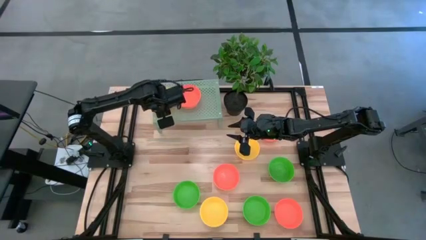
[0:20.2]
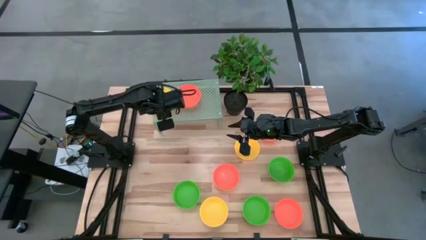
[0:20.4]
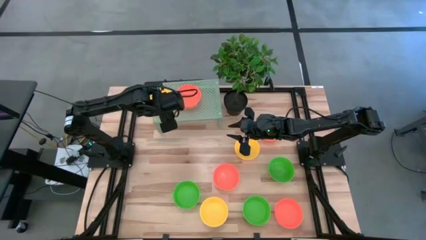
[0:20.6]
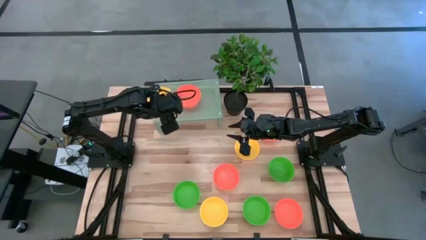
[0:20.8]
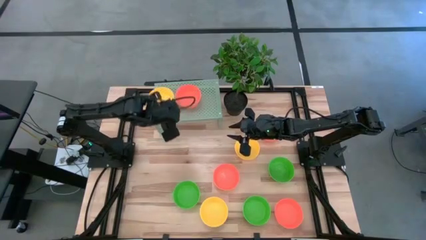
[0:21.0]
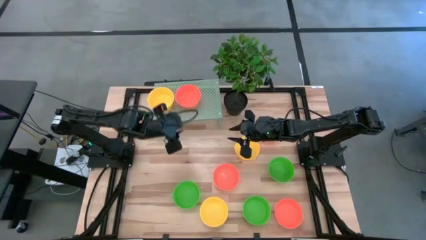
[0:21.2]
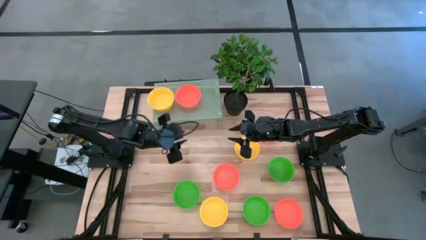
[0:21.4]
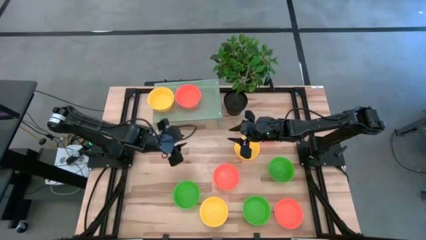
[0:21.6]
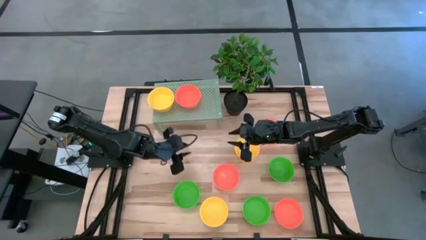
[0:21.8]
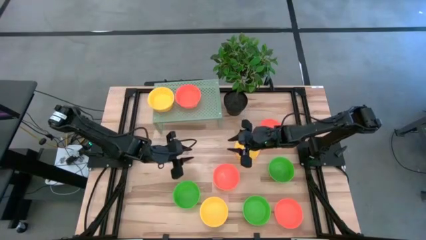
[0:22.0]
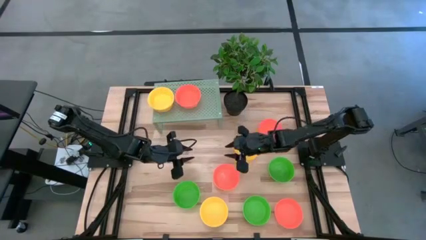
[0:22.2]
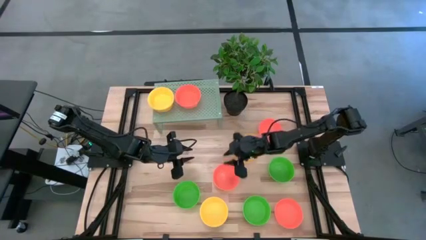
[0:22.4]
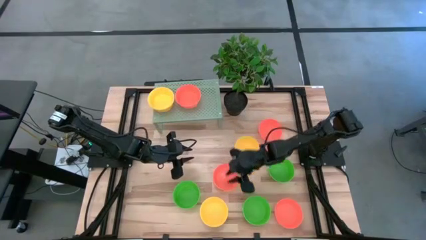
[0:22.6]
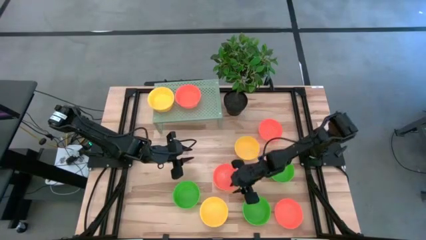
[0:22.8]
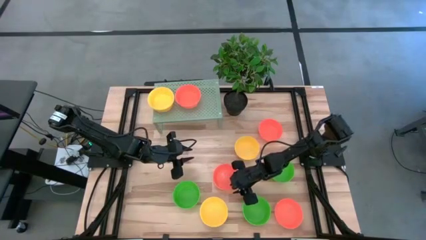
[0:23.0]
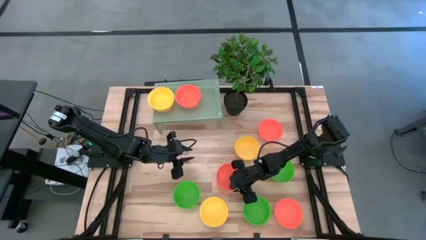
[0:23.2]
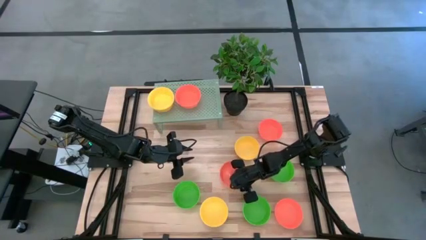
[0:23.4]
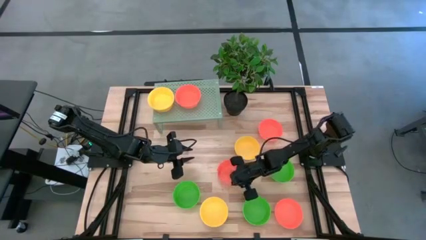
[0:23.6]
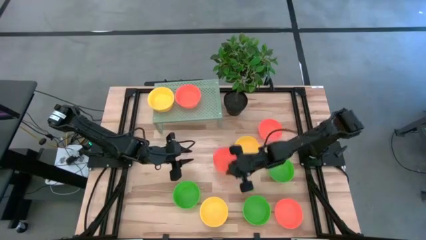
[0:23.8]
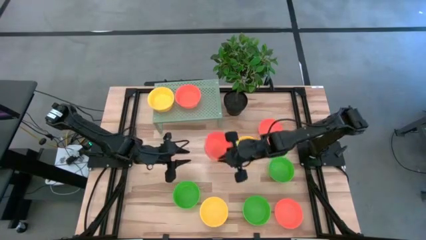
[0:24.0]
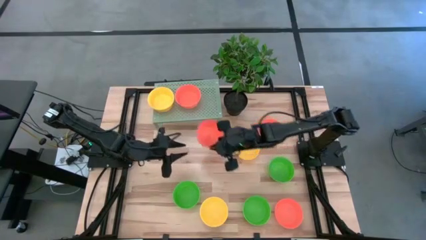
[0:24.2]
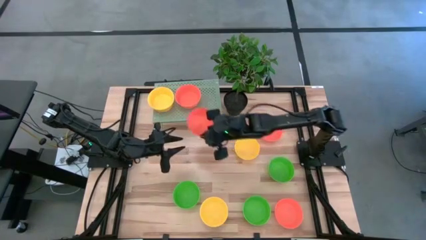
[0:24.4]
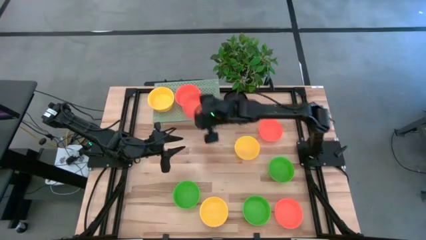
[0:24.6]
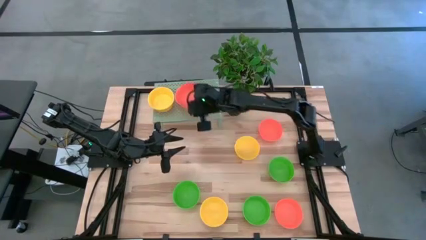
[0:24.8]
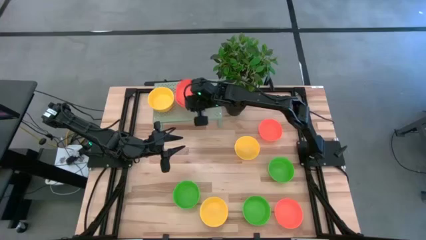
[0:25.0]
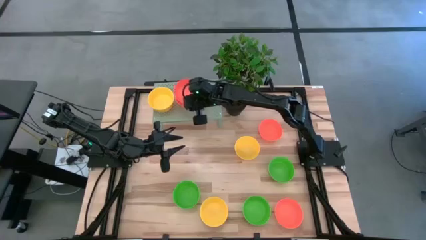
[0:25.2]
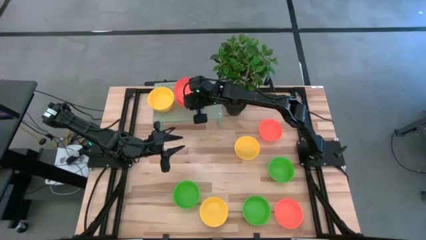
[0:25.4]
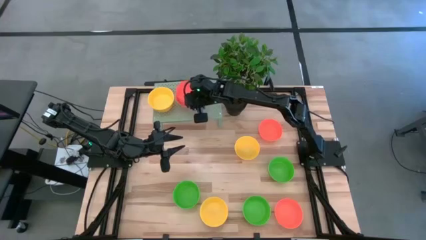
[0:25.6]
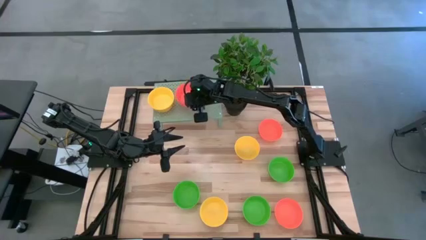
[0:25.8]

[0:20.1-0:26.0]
Task: Pick & Place Mini bowls
Stack the orange bowl on top of the other orange bowl on the shelf

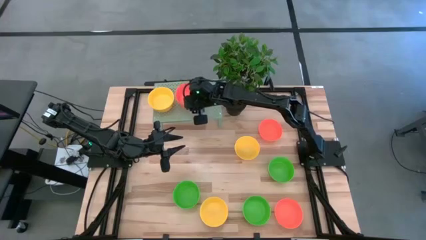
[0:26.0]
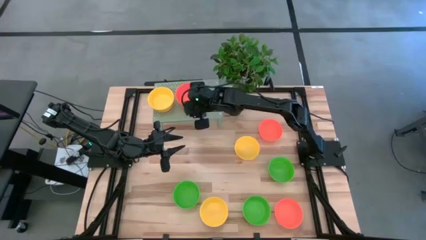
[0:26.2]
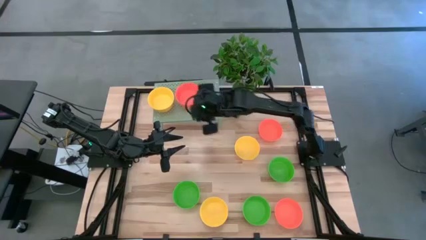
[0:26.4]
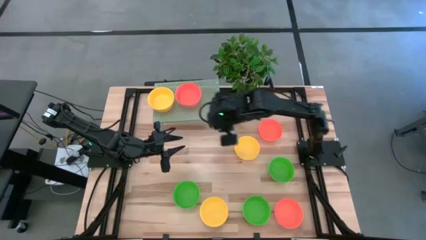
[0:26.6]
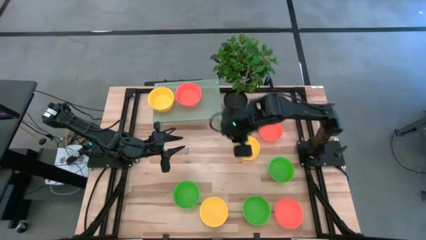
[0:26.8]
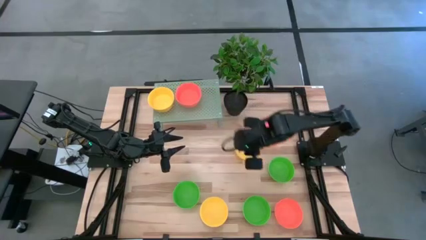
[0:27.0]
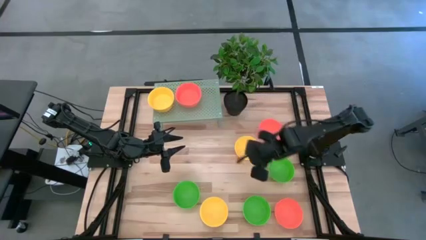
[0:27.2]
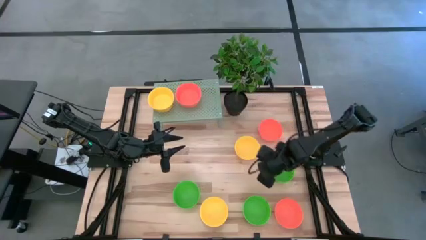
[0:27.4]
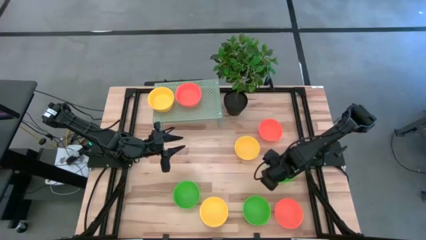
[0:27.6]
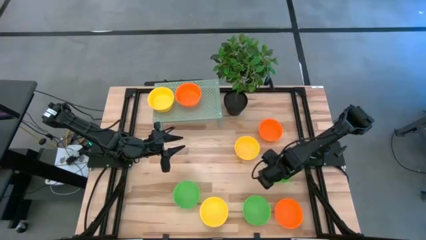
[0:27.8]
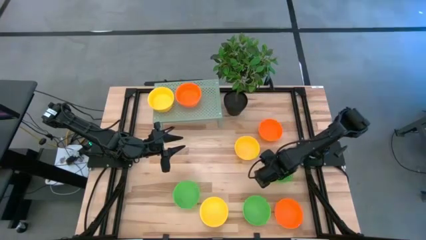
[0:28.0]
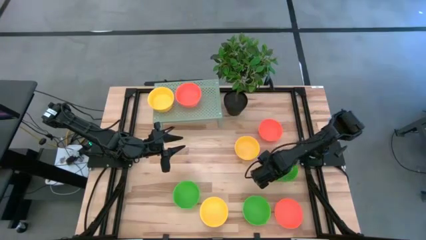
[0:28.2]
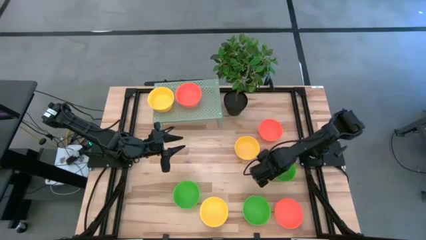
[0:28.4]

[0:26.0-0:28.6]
Put the green bowl on the shelf

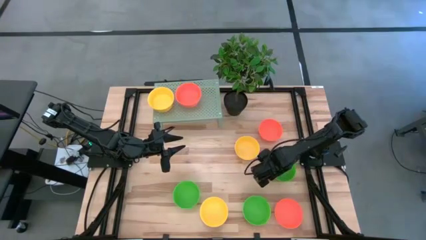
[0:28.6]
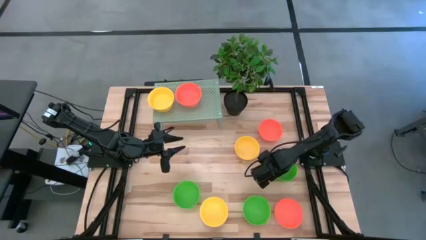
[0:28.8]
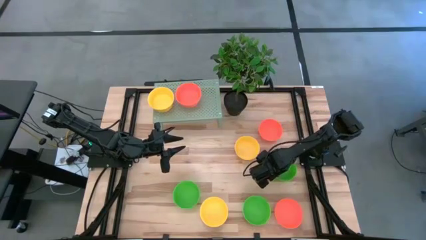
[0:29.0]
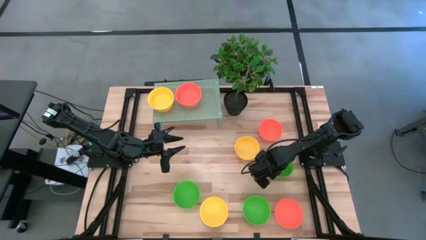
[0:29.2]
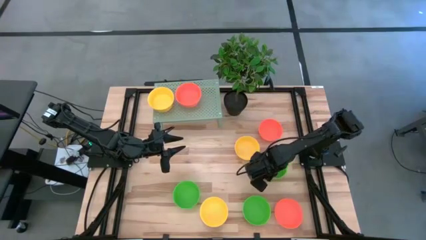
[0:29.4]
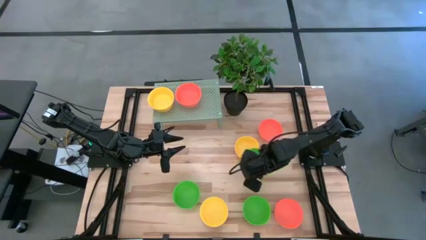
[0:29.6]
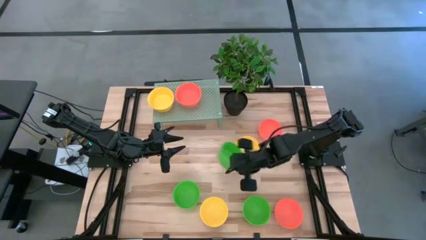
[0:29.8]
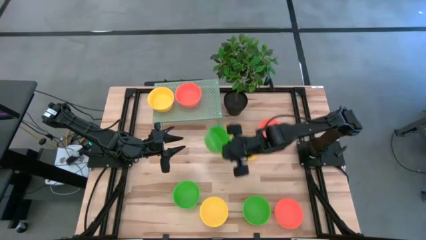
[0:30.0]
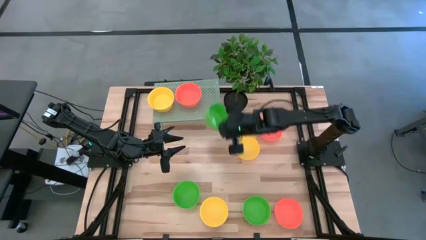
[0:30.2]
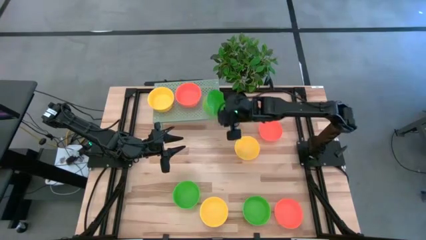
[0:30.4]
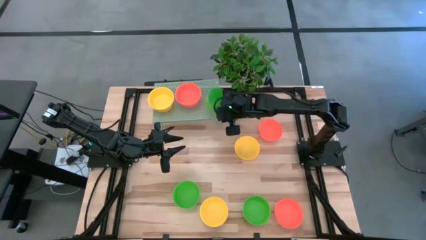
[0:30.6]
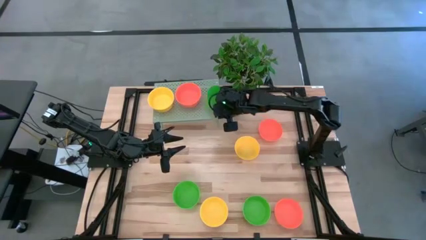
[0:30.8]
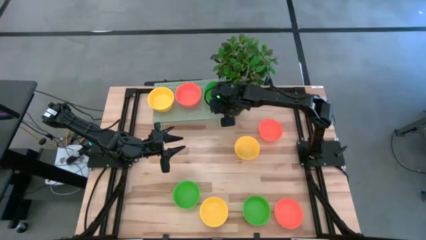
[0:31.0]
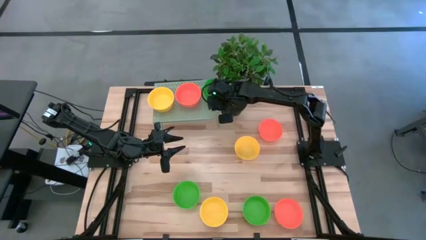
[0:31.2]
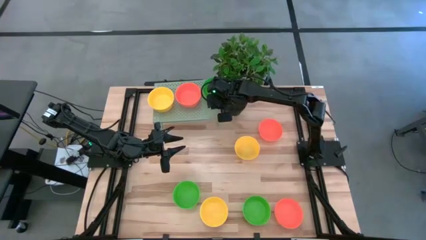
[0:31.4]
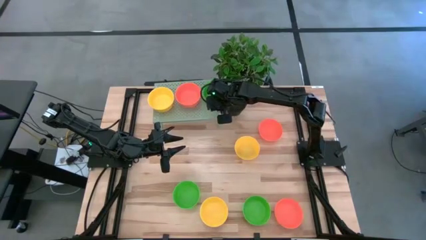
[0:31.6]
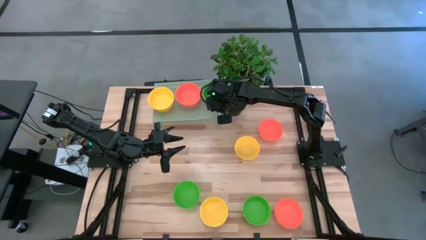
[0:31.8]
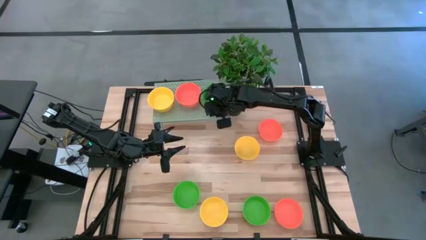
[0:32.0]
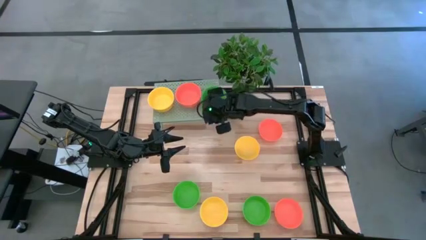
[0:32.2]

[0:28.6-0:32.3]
Put the green bowl on the shelf

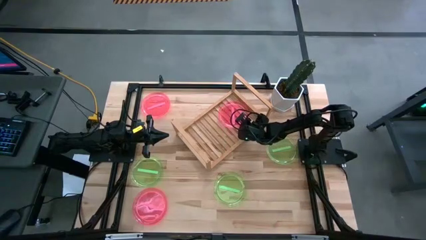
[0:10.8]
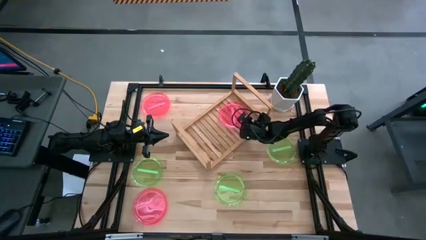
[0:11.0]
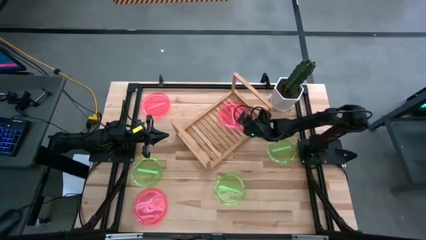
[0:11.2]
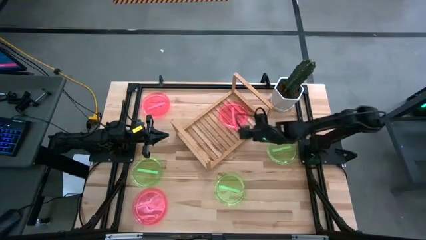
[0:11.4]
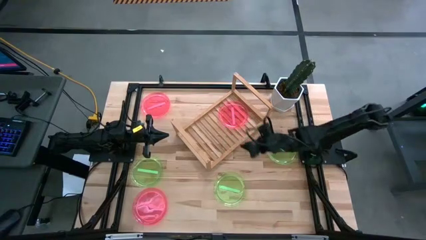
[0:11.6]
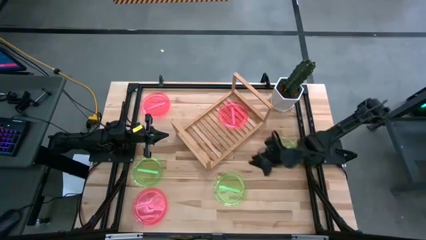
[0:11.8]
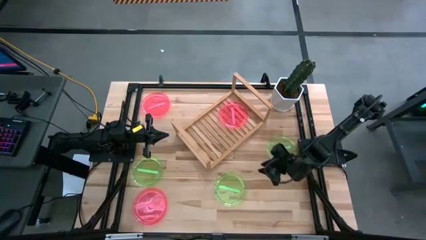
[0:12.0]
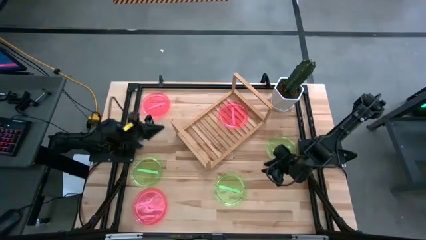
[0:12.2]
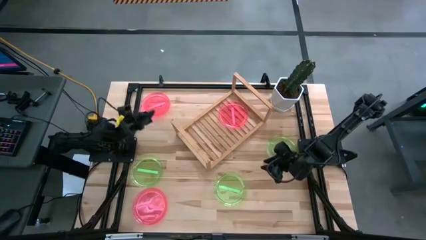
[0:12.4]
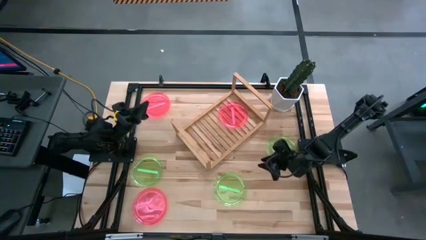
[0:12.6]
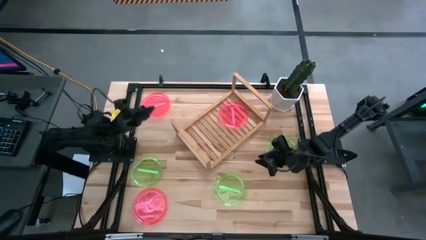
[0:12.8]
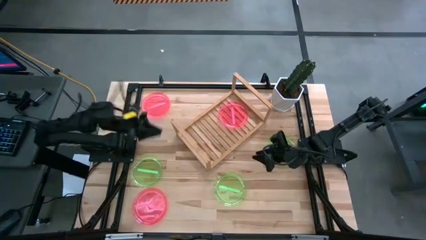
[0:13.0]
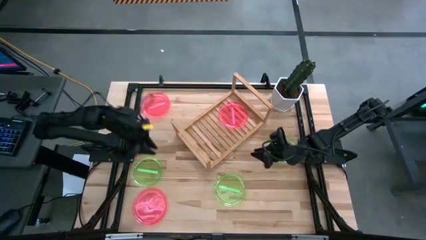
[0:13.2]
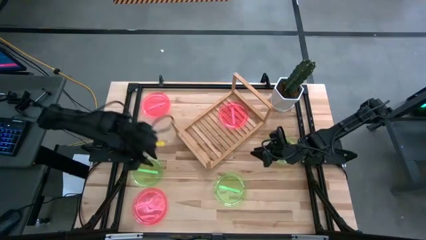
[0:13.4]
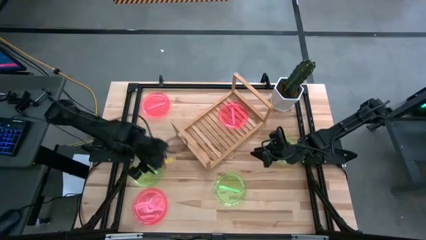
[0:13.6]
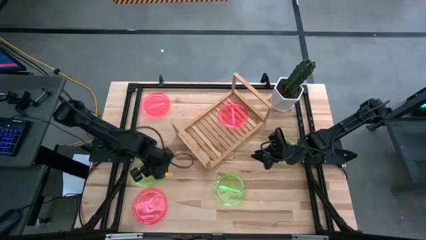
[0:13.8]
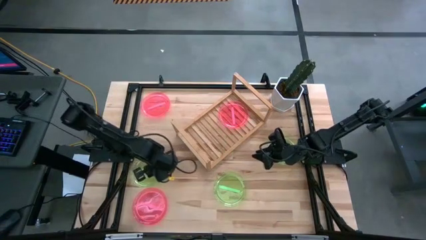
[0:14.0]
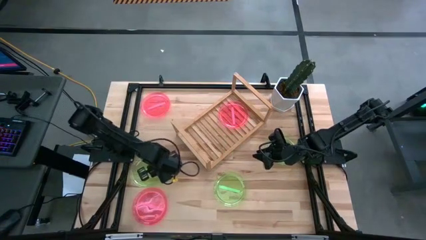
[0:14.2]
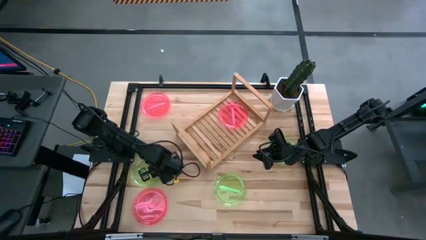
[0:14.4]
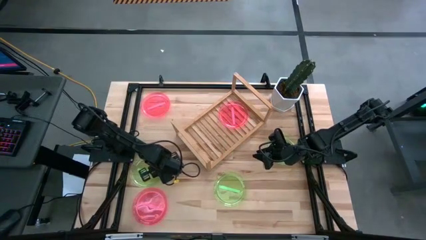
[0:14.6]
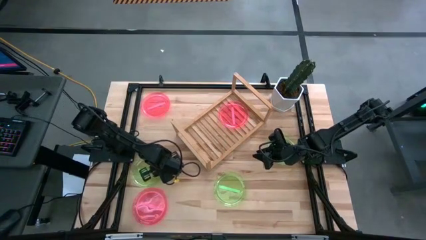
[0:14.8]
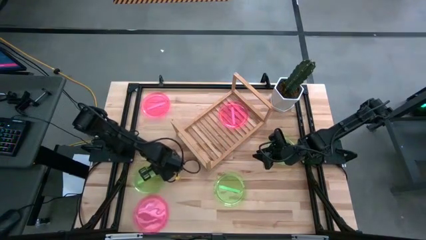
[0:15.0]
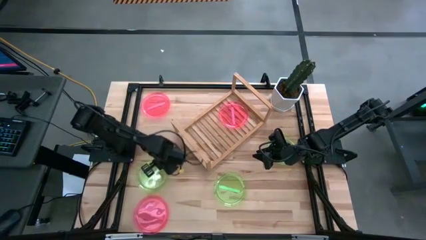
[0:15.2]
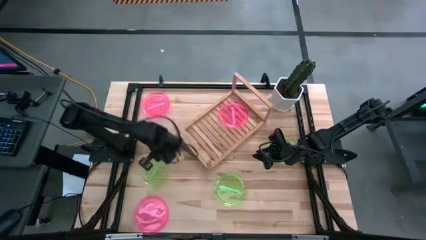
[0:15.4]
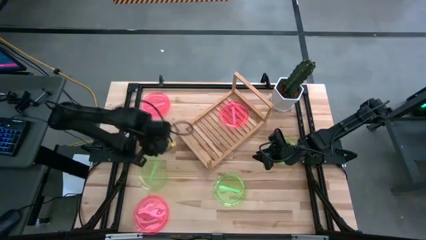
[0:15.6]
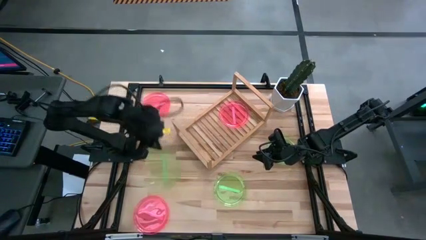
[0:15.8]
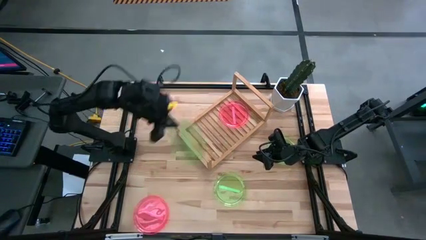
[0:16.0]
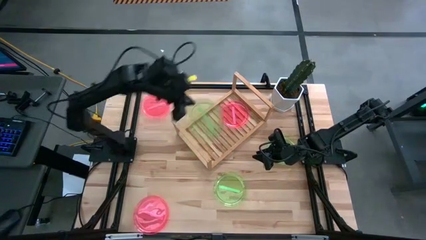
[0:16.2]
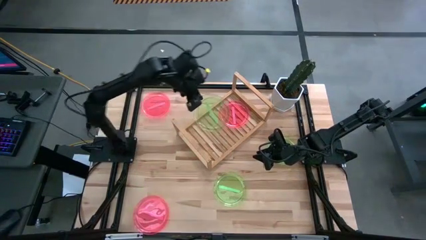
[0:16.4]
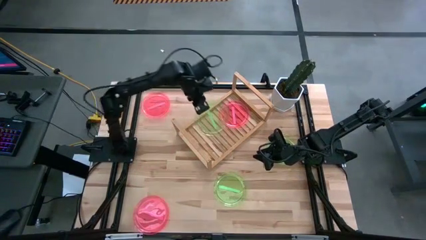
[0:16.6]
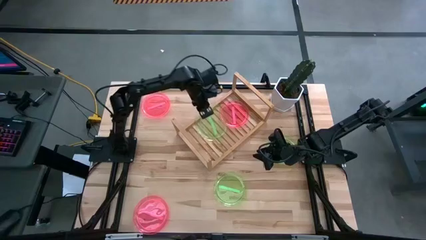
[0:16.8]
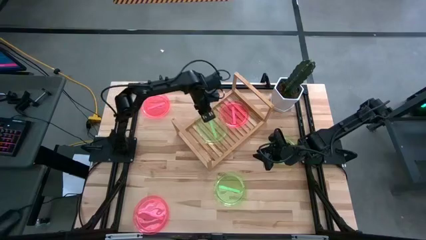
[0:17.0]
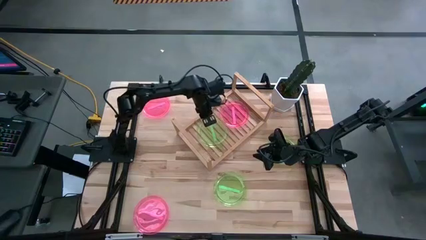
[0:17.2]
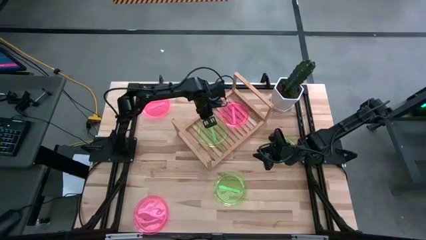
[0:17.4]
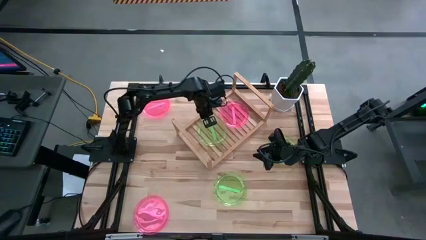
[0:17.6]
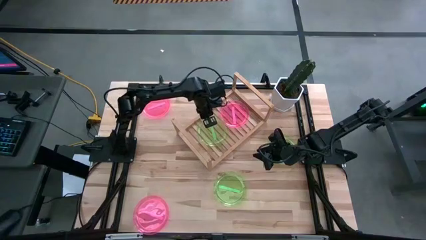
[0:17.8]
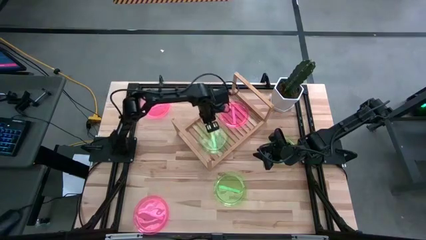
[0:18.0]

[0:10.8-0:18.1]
Task: Place and stack plates onto a shelf
Put the middle green plate on the shelf
